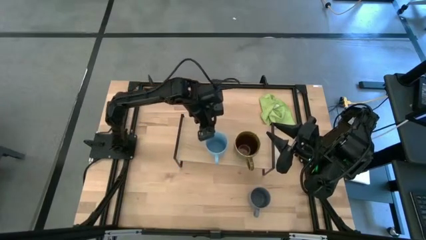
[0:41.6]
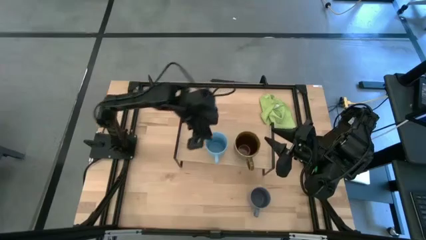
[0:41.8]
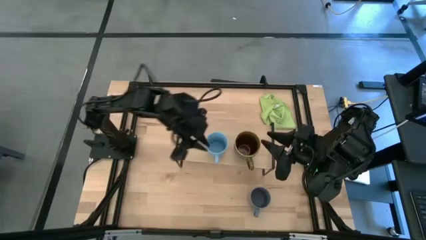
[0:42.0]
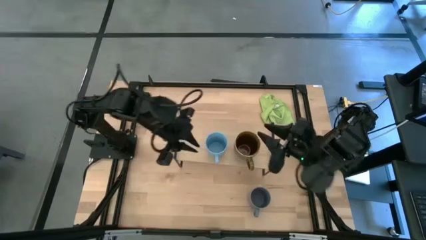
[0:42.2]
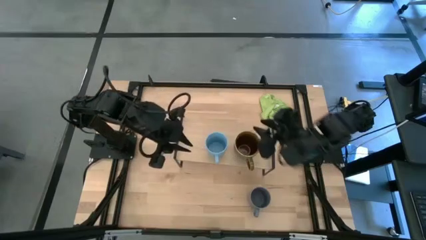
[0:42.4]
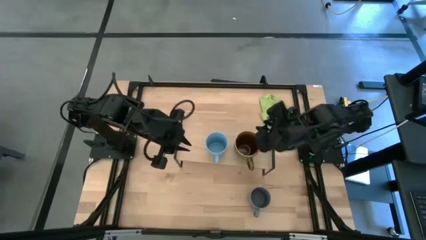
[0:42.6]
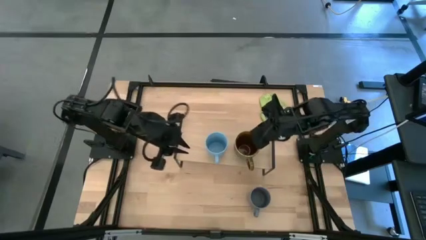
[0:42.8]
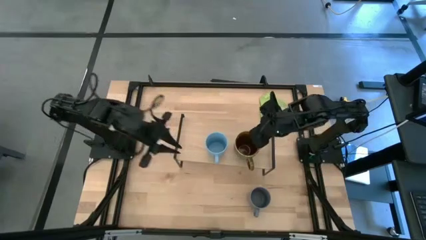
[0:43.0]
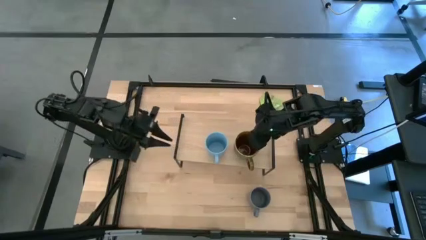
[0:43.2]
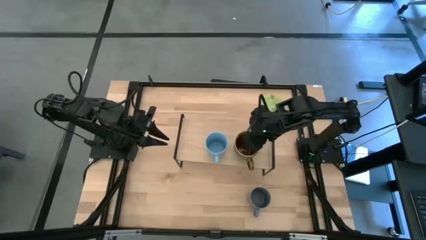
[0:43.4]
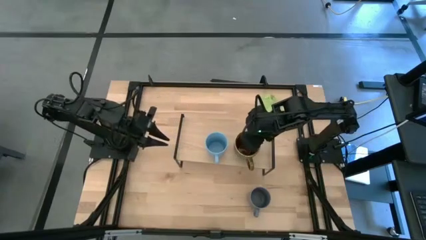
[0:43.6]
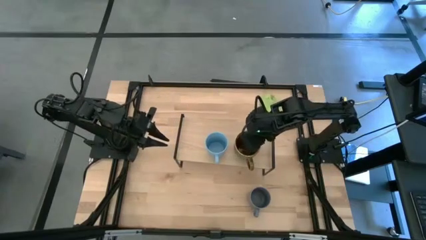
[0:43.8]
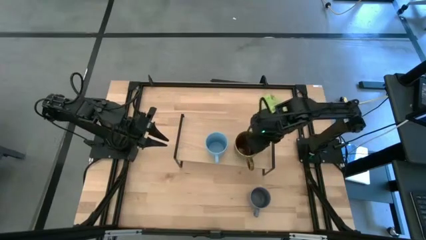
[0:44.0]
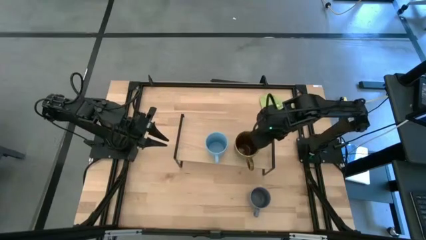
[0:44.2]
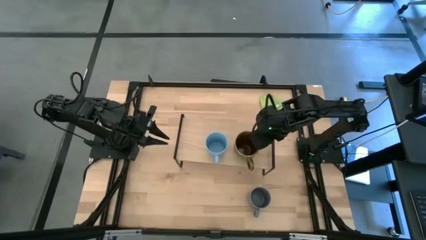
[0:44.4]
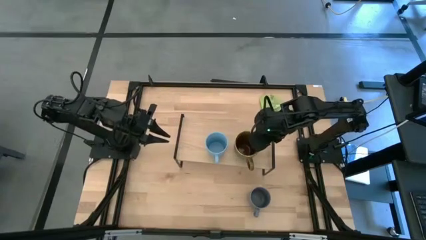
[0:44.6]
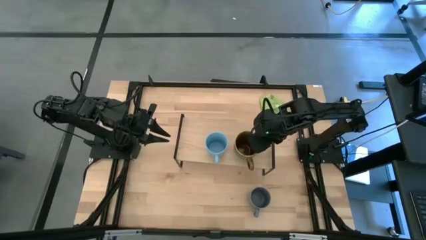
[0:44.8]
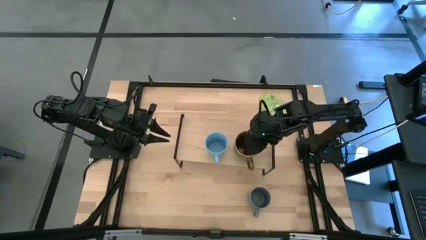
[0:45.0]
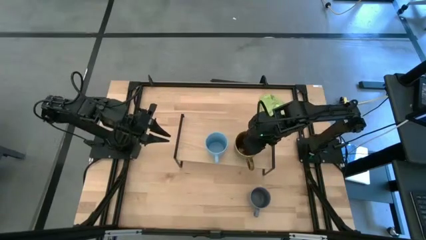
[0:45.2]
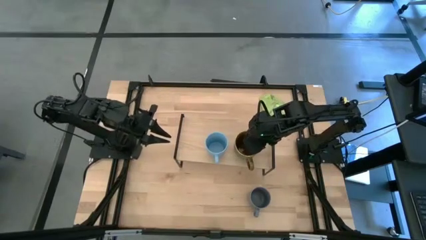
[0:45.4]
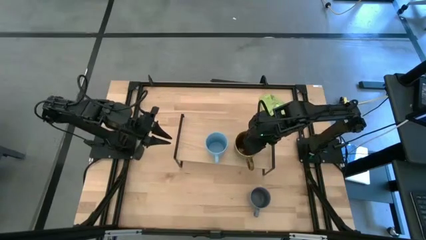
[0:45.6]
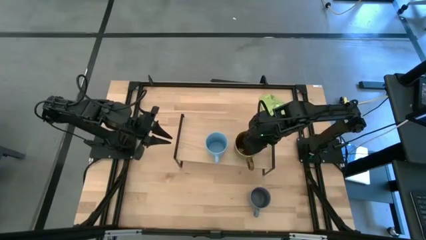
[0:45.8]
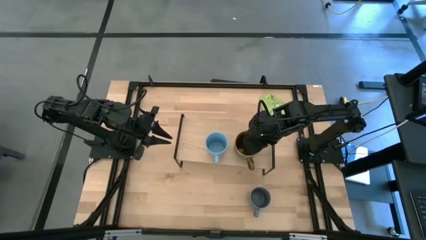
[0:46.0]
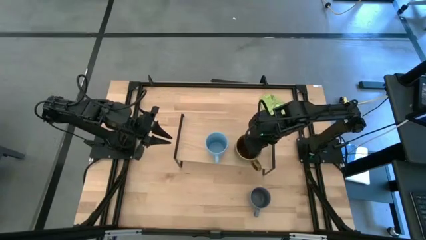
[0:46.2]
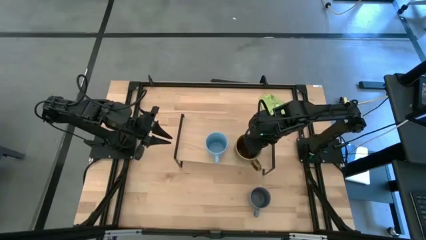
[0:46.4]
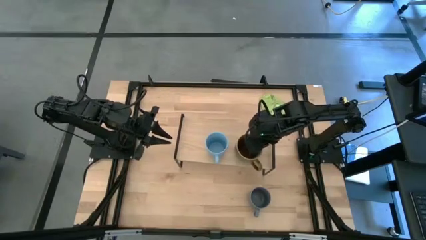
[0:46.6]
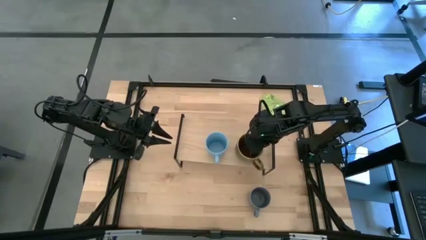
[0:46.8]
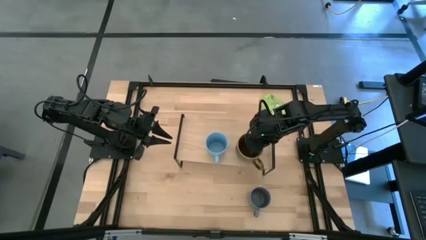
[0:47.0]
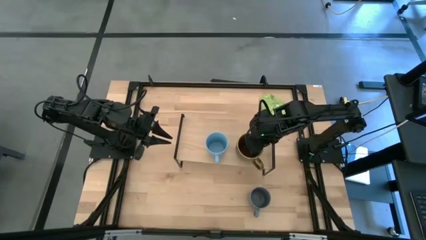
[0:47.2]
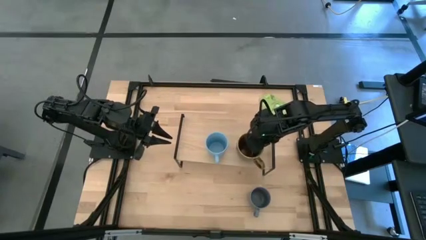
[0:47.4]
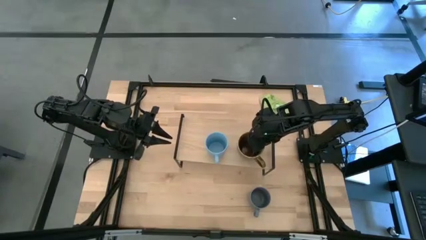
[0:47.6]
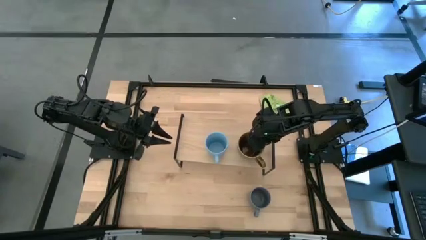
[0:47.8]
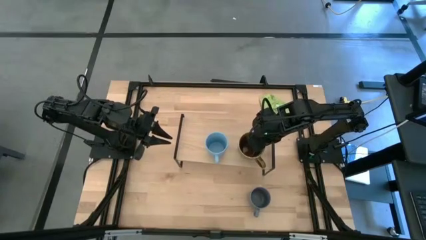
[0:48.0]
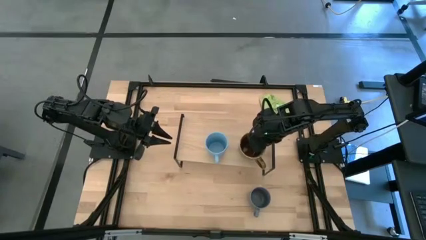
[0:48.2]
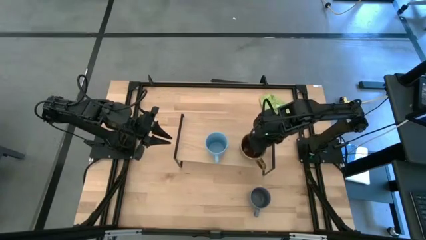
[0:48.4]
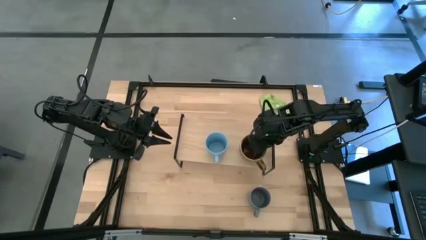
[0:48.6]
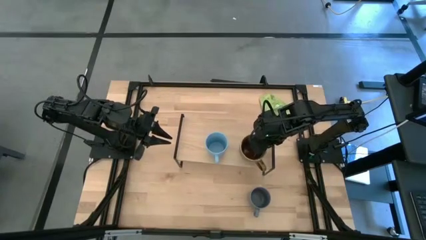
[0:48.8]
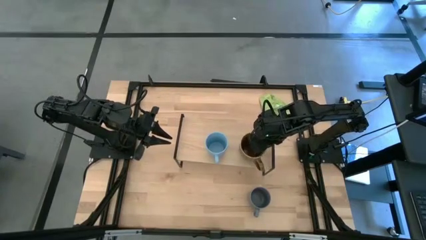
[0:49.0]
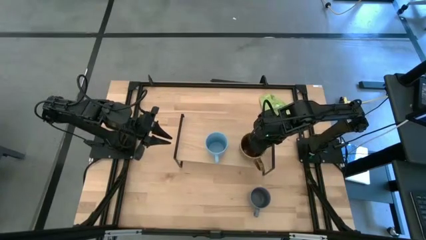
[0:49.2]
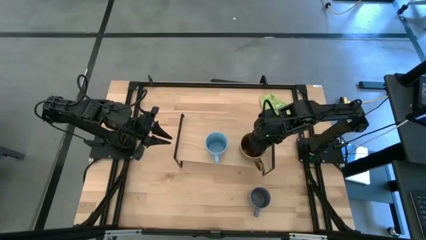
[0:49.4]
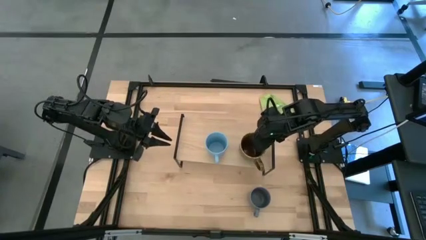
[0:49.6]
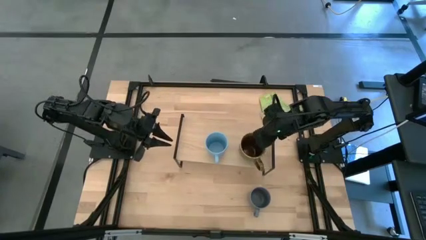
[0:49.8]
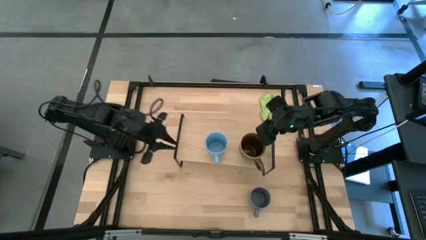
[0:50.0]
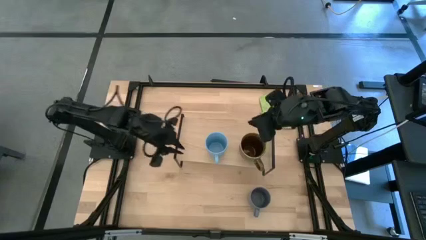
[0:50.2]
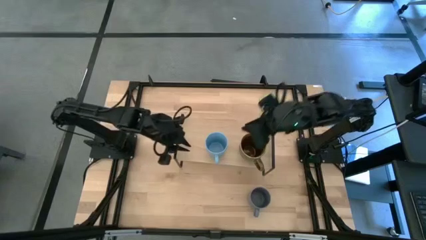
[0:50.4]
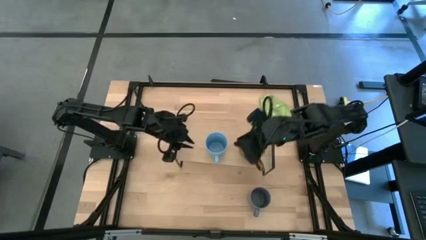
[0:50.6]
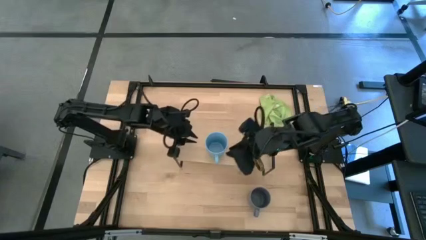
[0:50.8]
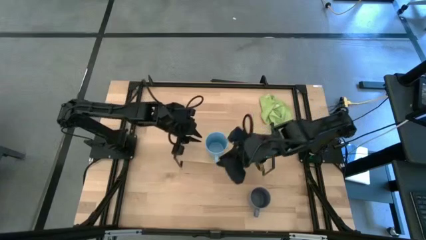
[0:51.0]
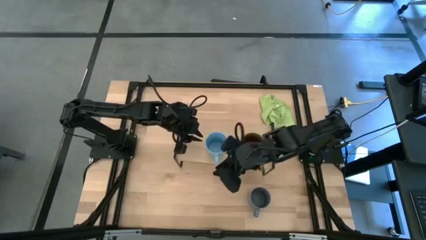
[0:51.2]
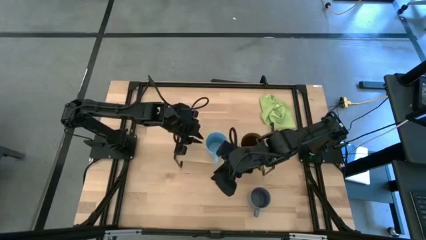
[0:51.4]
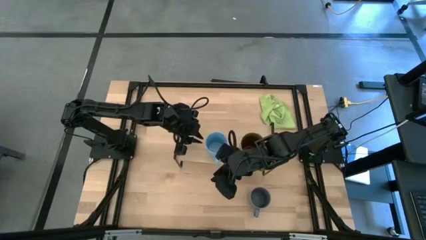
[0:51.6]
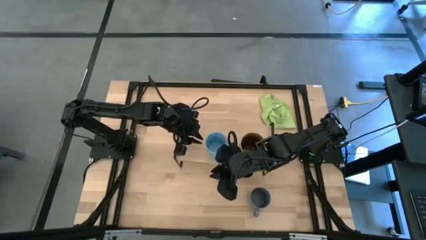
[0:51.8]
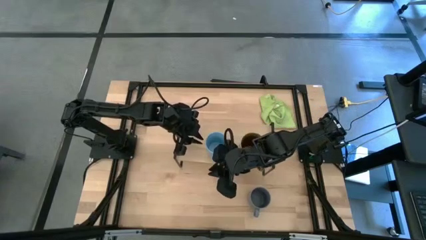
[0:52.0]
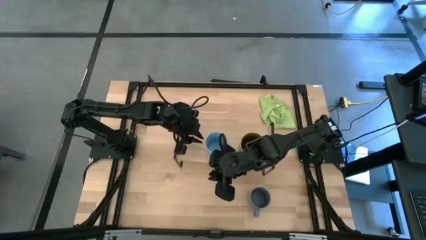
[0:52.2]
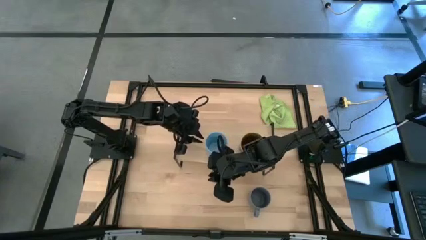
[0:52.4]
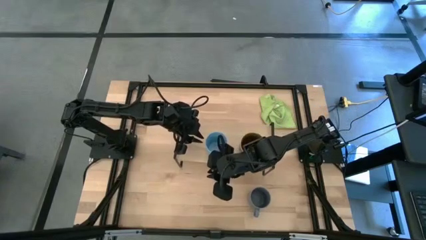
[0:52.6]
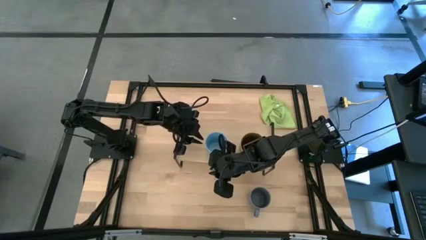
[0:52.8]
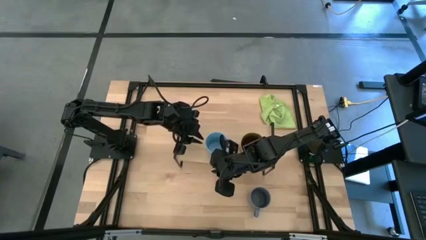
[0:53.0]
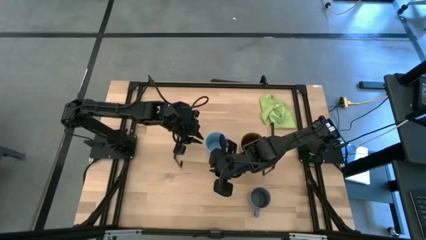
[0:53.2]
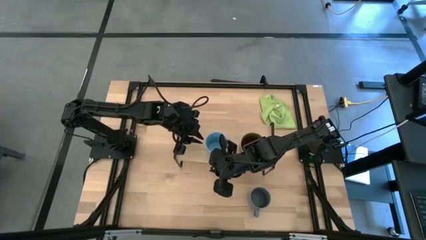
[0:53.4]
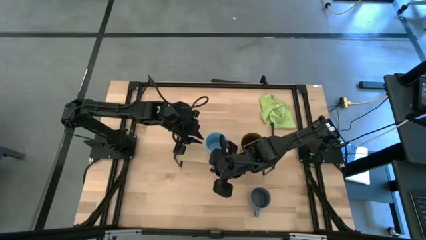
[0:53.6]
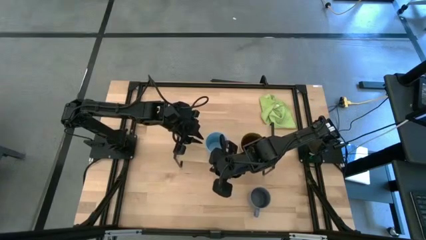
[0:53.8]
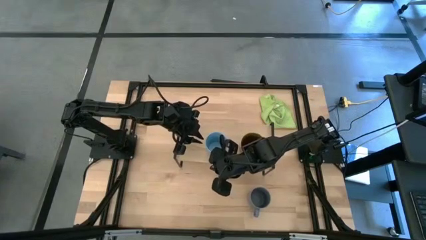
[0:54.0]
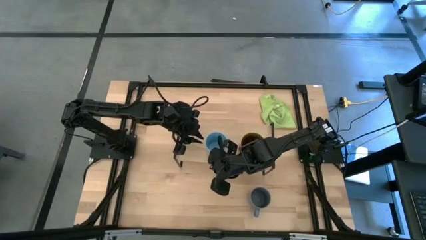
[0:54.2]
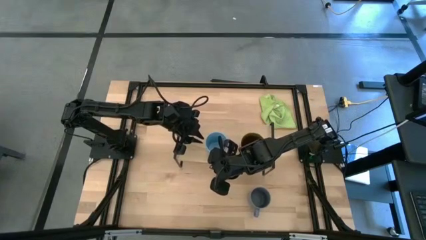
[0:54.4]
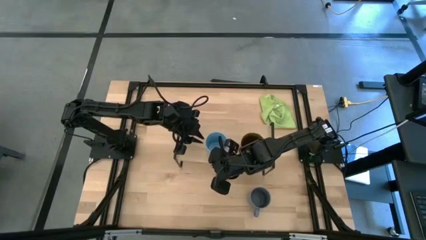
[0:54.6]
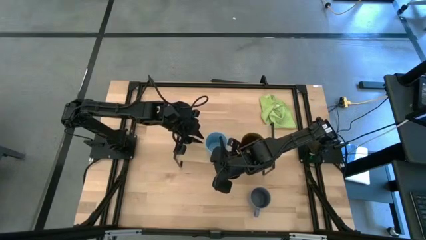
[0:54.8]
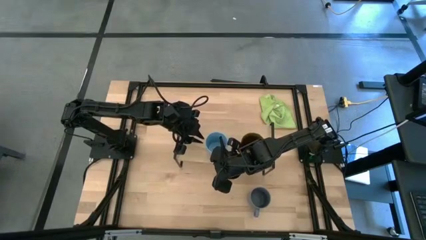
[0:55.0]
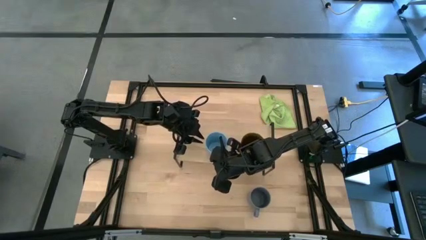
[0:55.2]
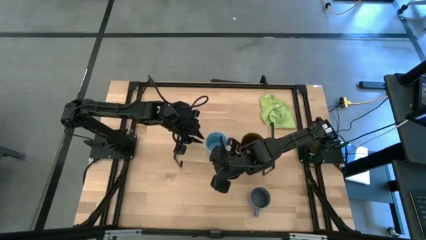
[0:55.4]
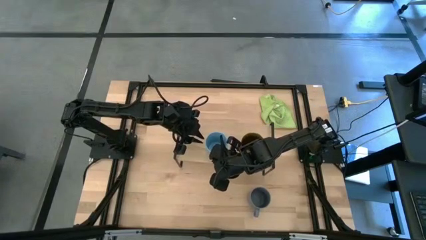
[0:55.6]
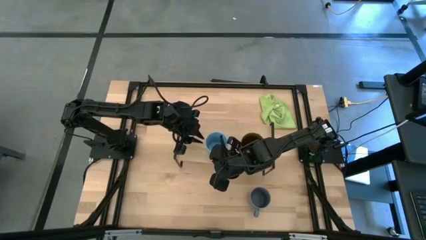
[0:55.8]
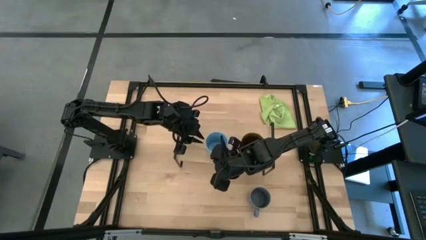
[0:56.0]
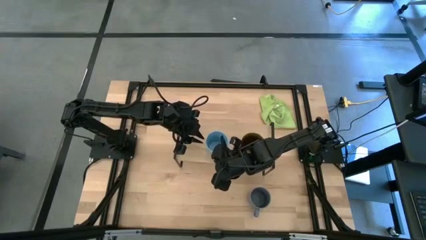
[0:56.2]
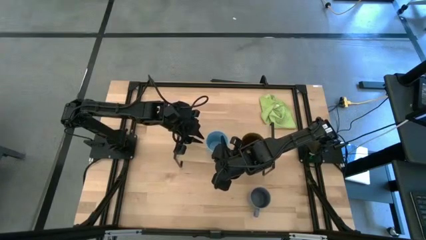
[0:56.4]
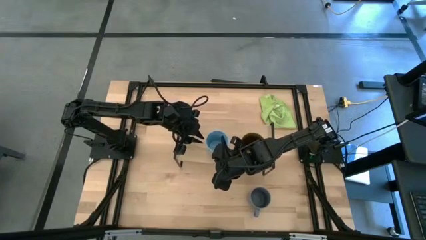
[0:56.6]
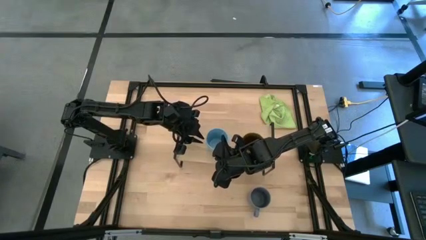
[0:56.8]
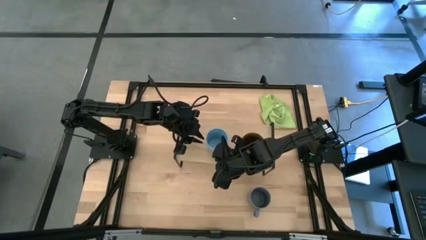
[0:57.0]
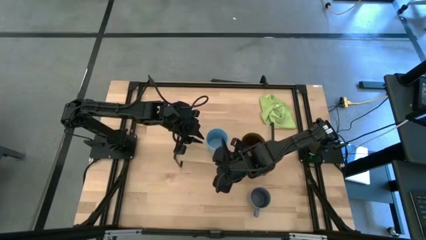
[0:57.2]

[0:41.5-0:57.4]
Task: Stack small to large cups/mugs on shelf
Adjust the mugs on the shelf

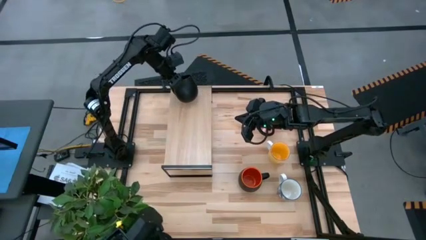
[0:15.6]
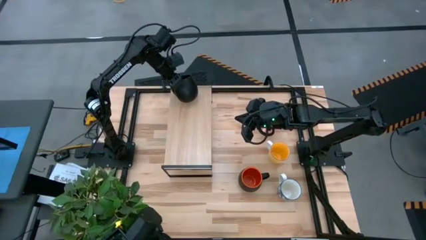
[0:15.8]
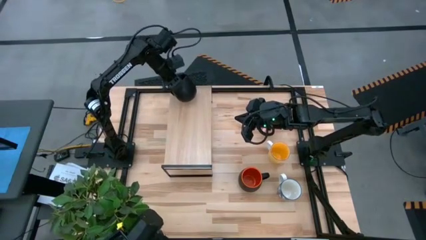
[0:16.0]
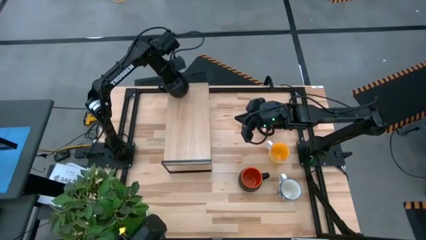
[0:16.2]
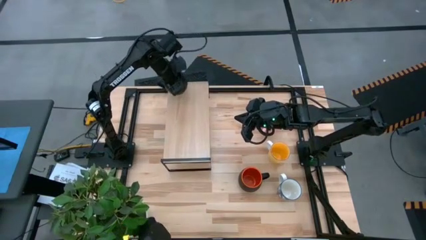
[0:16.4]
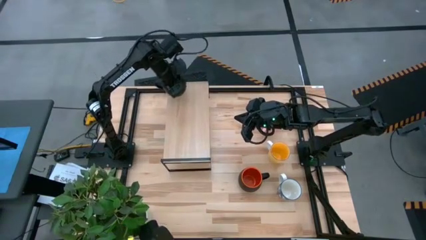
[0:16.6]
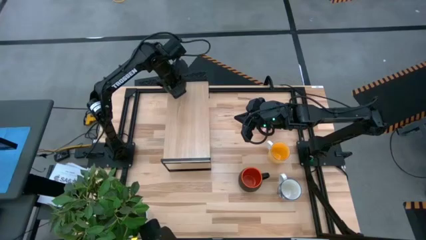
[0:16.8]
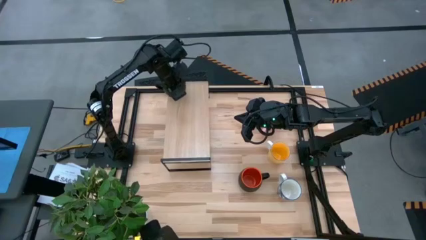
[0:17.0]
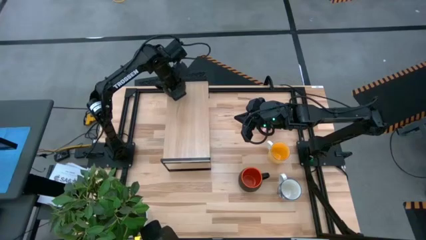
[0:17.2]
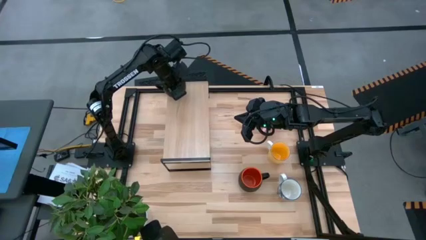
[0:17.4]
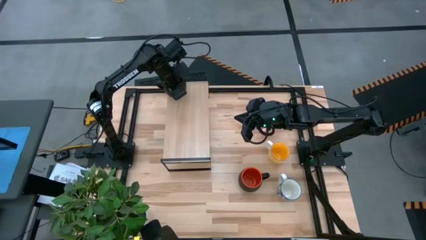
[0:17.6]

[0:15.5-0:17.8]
Task: Place coffee mugs
Put the black mug on the shelf
